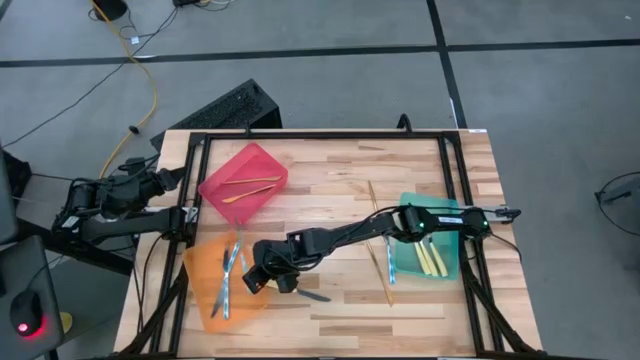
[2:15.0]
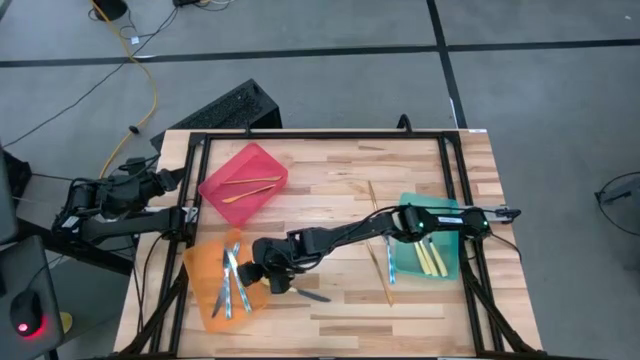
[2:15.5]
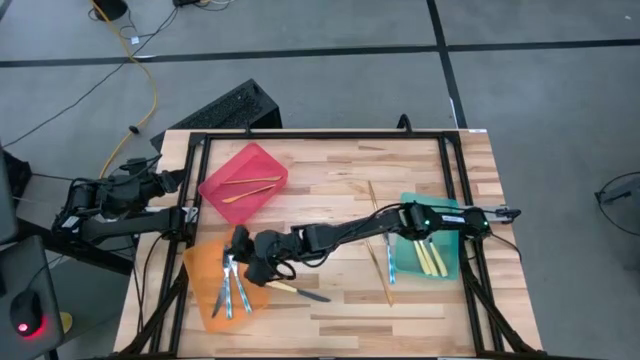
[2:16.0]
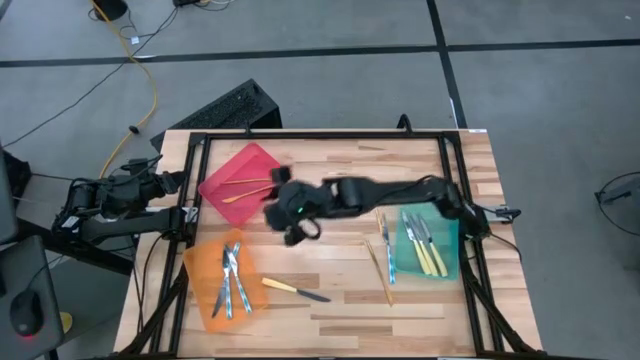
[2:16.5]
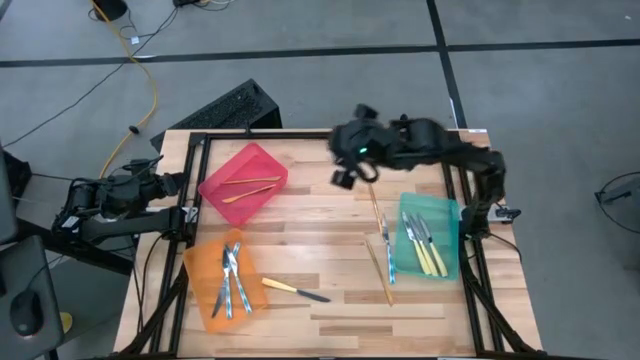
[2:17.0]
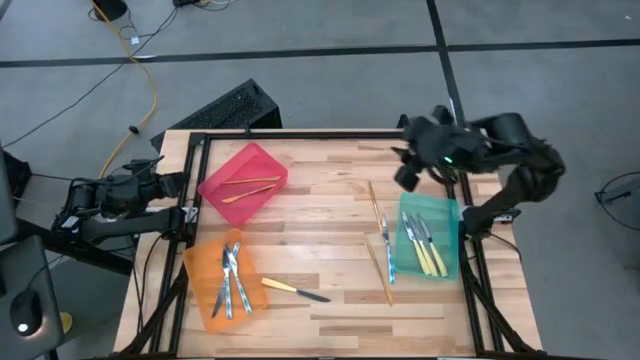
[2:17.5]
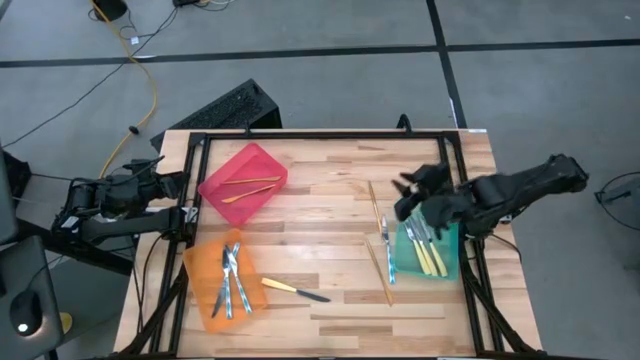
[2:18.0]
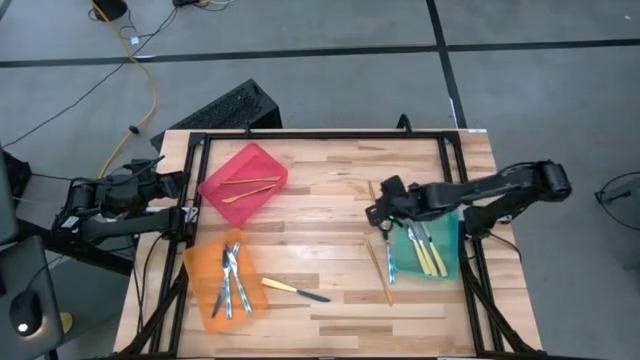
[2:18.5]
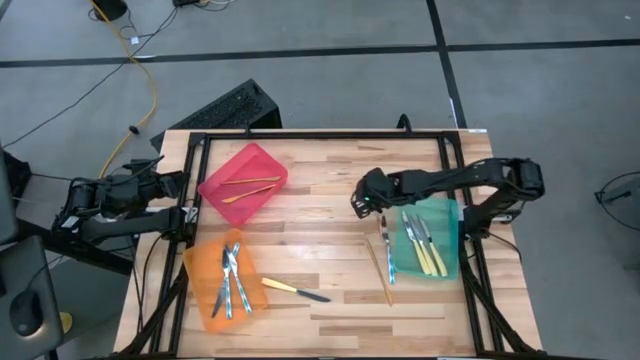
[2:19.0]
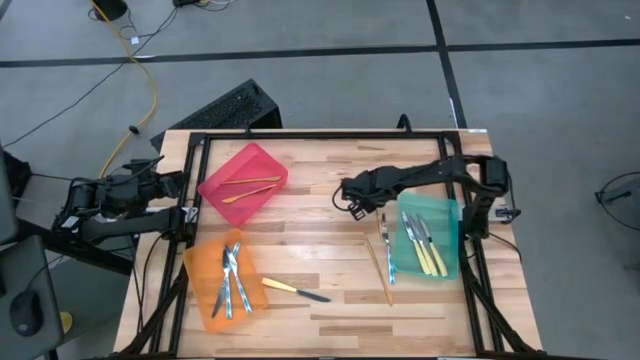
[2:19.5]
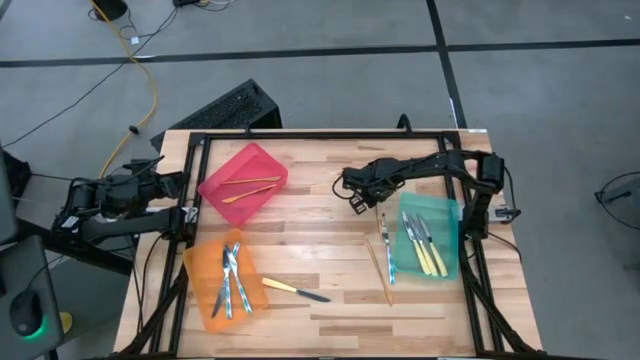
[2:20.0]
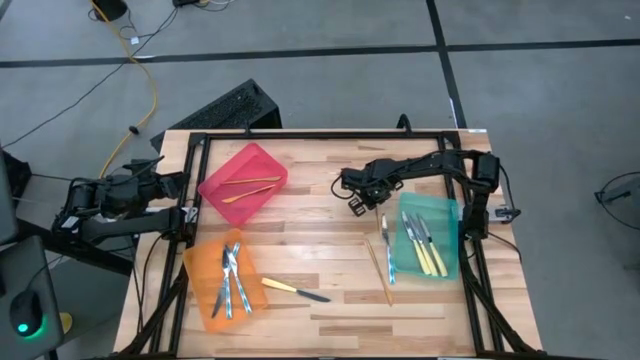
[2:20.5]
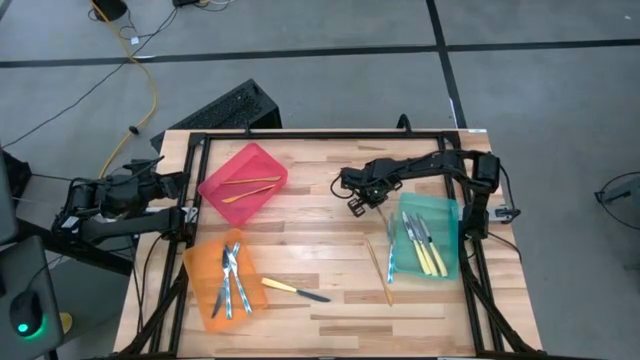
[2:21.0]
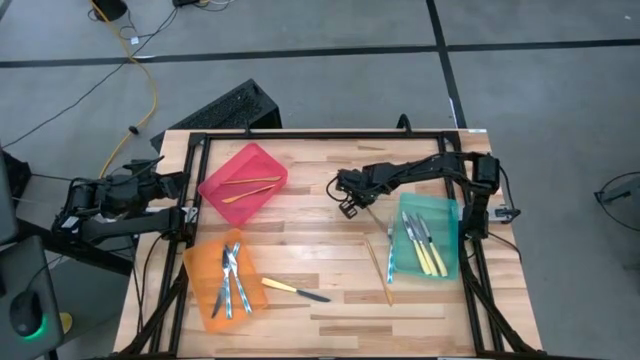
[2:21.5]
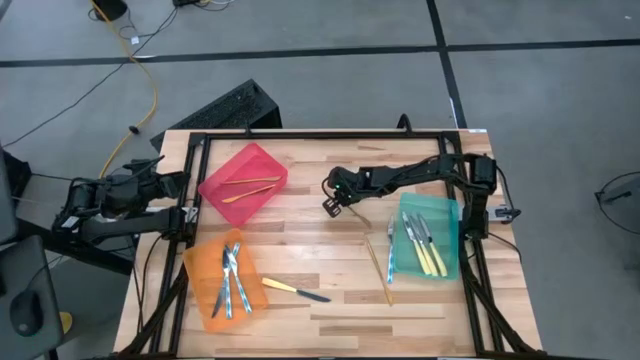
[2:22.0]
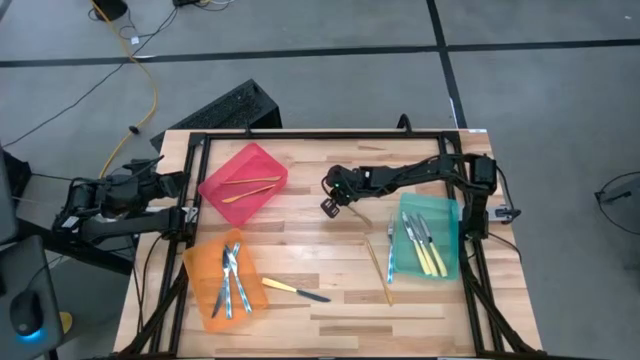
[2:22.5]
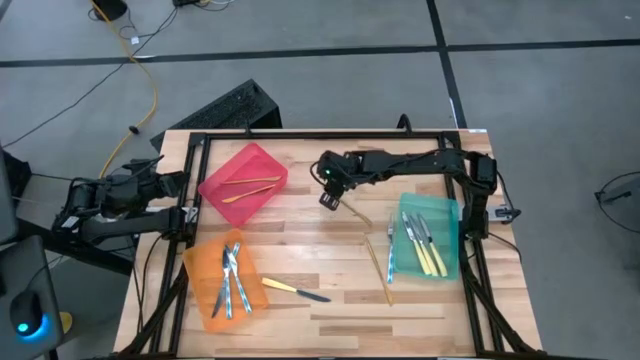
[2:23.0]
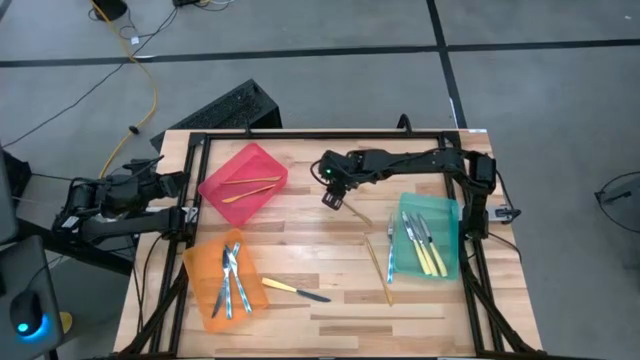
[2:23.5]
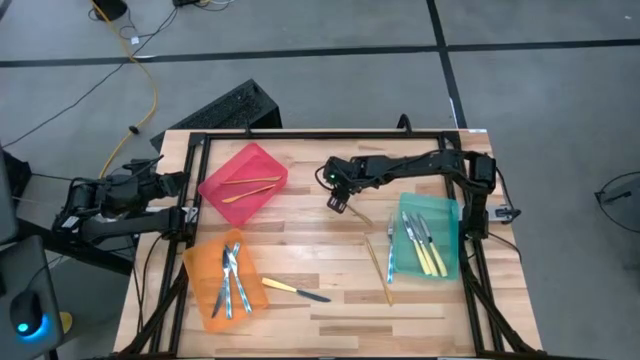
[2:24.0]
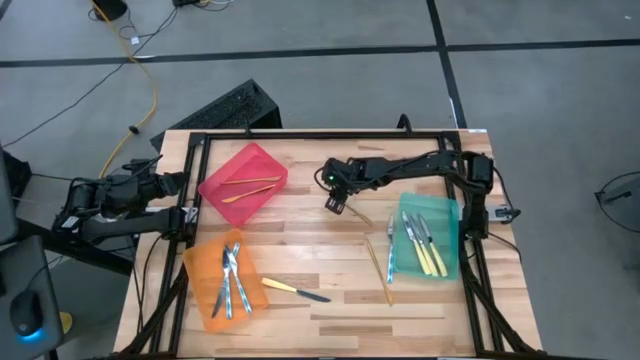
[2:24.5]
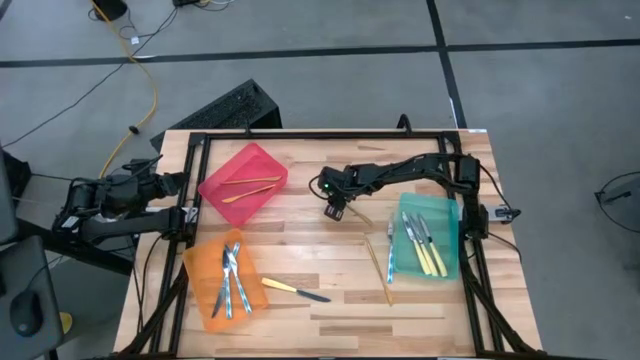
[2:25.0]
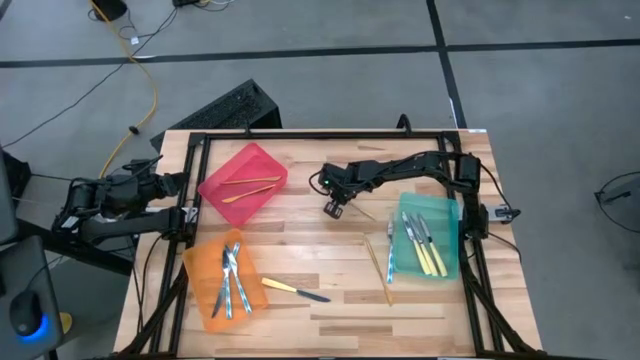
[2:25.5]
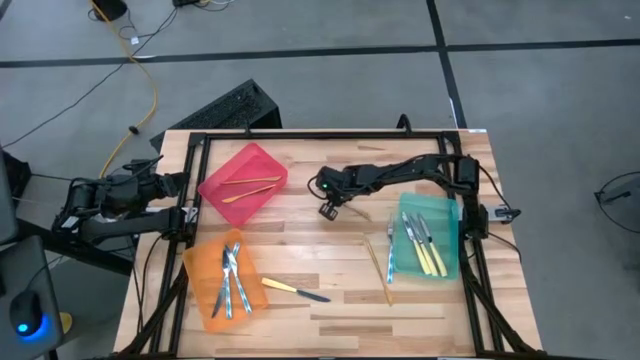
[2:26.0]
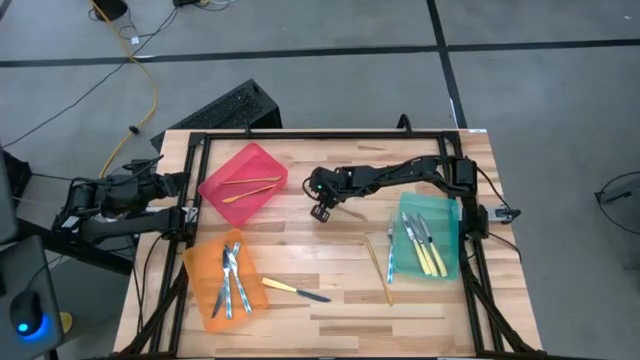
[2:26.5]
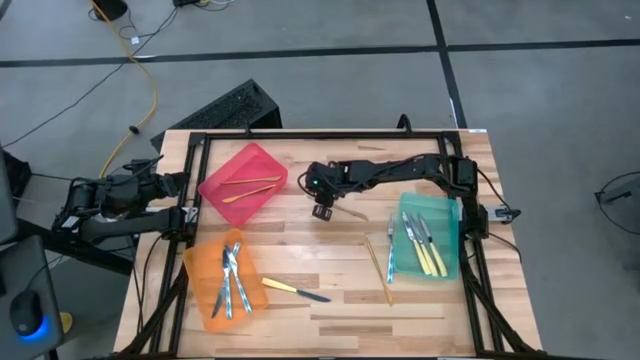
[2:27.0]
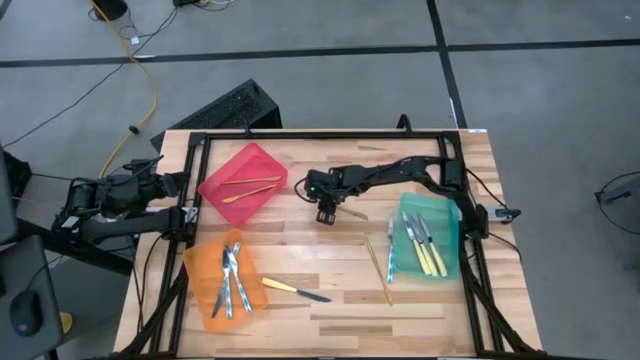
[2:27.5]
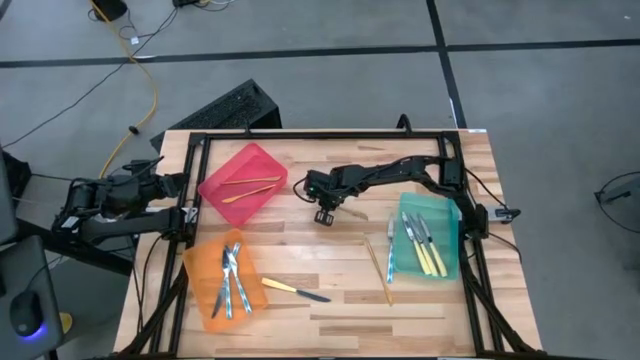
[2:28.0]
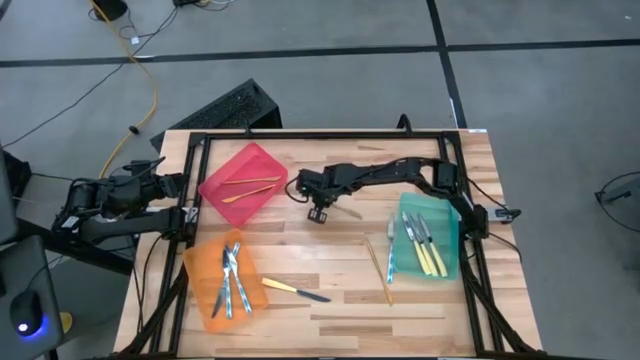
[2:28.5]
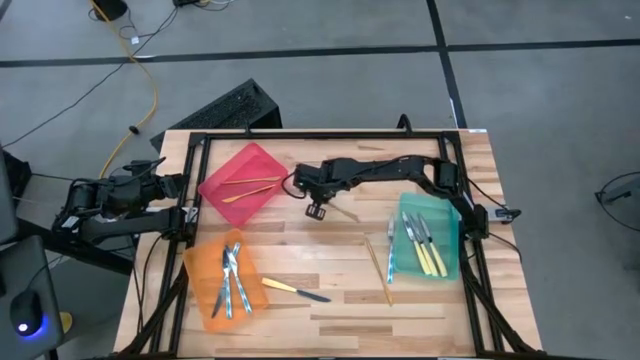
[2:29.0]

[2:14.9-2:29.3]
Task: Sort silverware by color (type)
Put the top gold knife into the red bin

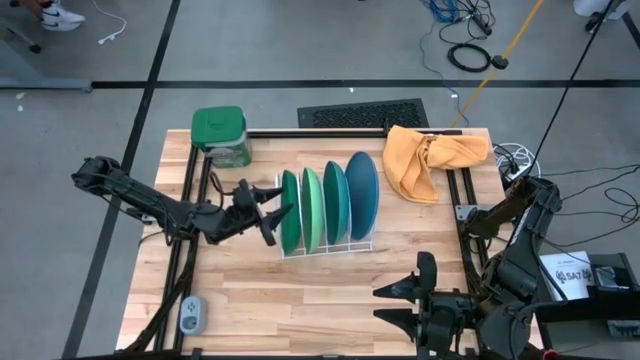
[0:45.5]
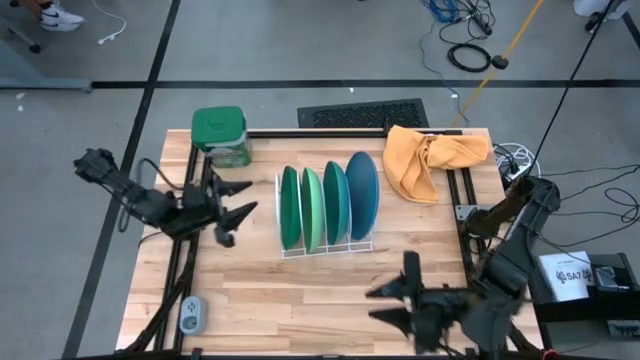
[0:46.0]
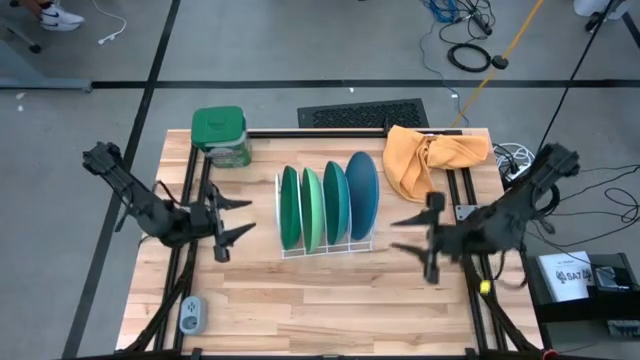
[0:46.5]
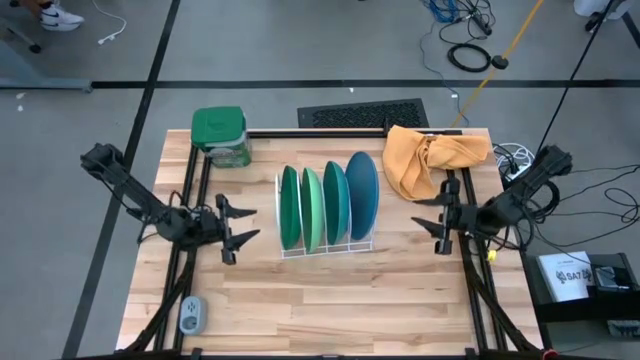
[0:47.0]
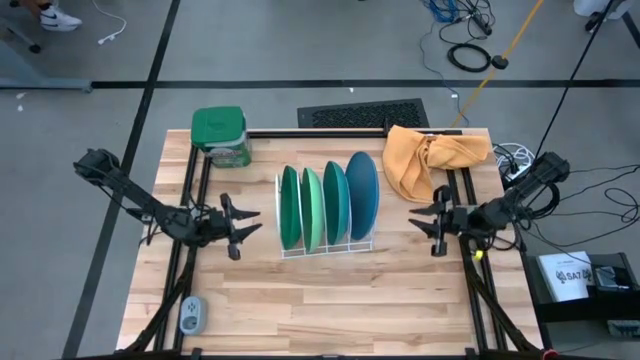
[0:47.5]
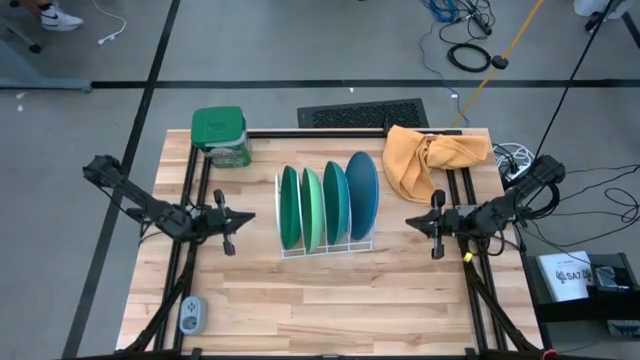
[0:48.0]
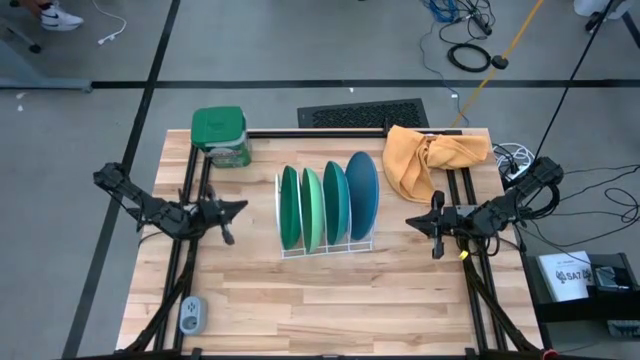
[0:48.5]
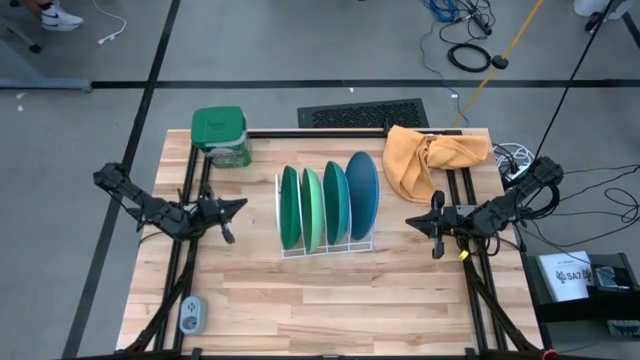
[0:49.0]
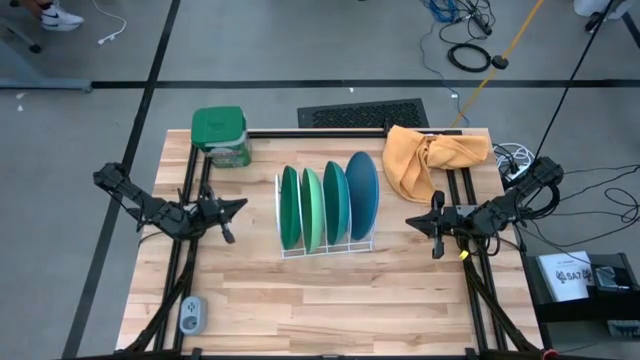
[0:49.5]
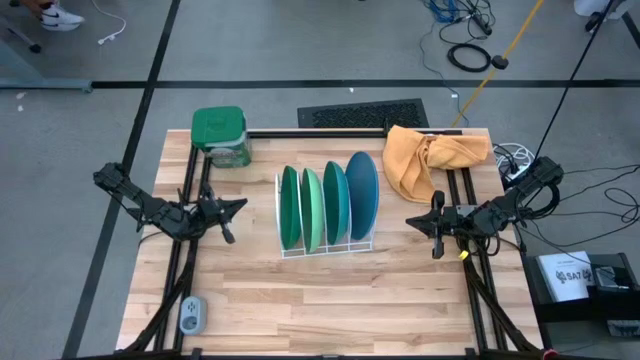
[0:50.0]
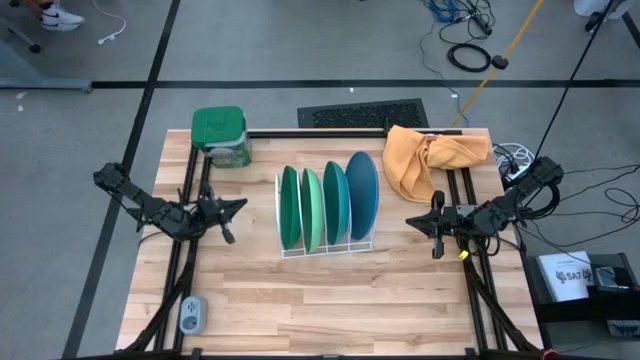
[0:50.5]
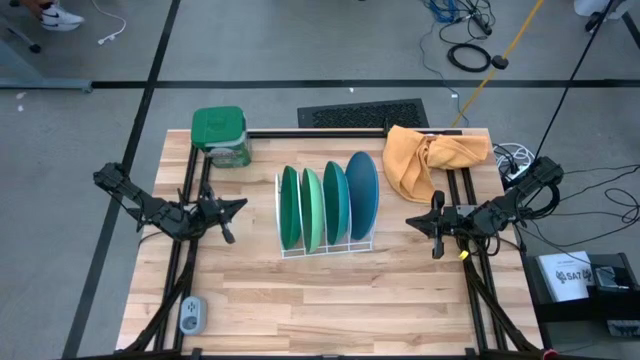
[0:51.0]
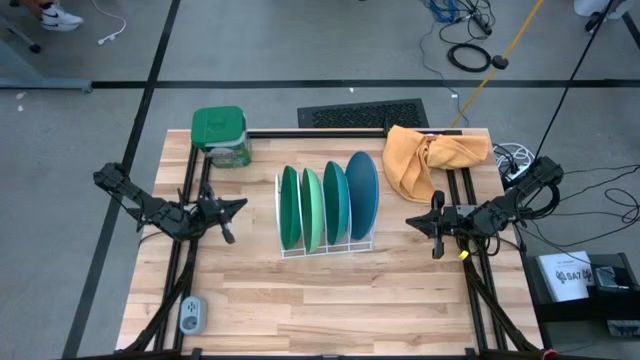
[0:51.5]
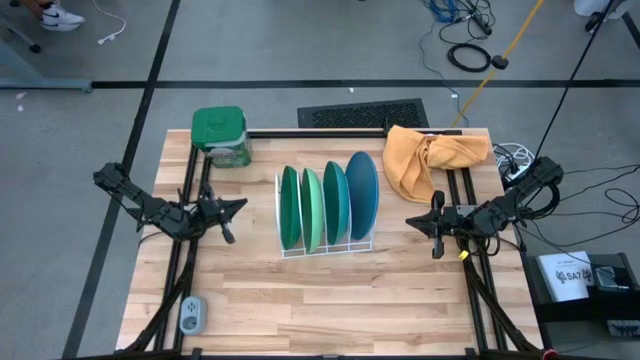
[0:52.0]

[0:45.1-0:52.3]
Task: Sort dishes
Return to Home Position
